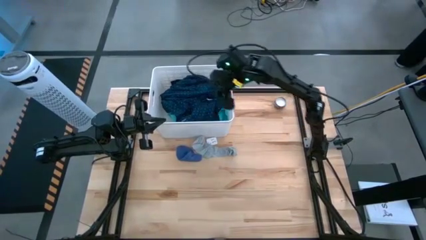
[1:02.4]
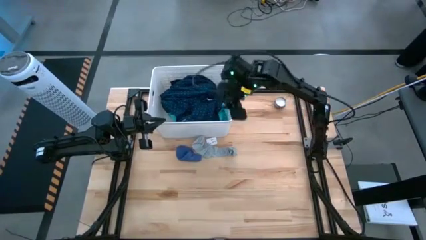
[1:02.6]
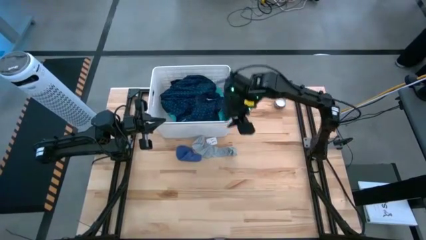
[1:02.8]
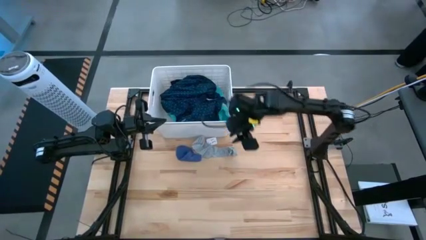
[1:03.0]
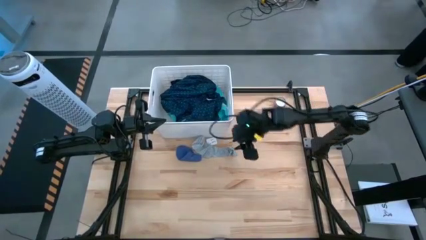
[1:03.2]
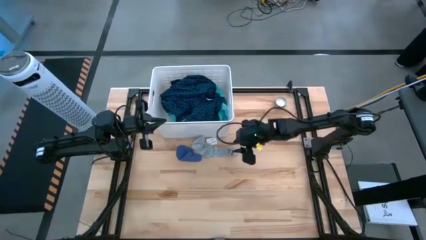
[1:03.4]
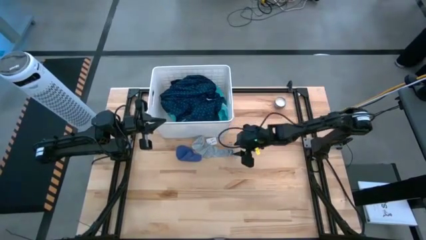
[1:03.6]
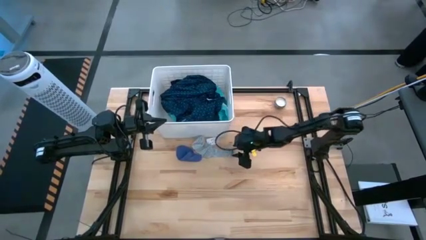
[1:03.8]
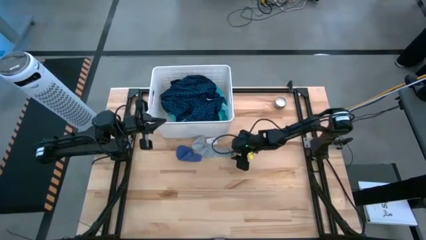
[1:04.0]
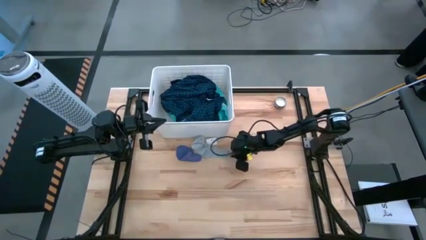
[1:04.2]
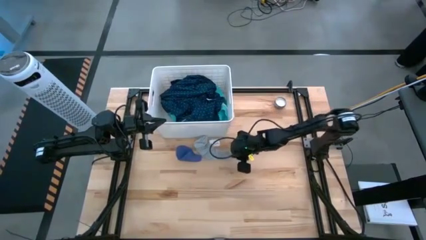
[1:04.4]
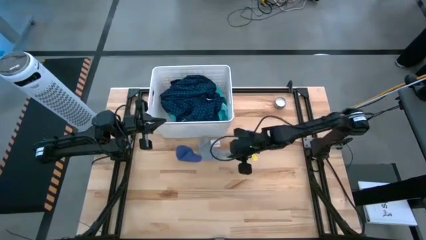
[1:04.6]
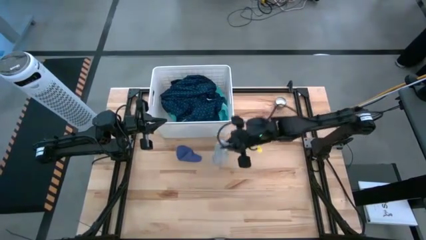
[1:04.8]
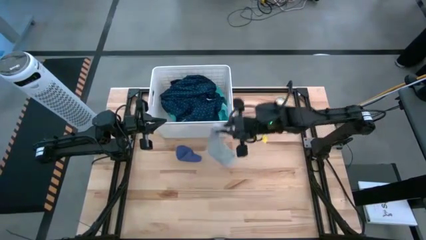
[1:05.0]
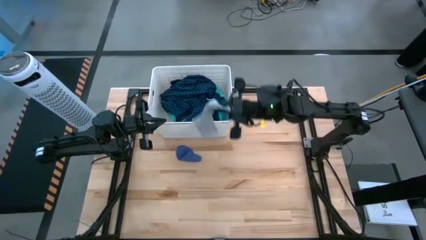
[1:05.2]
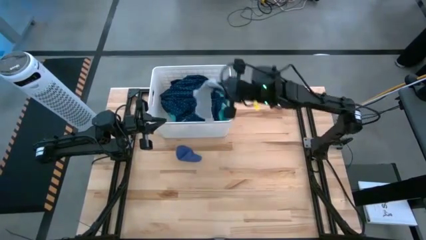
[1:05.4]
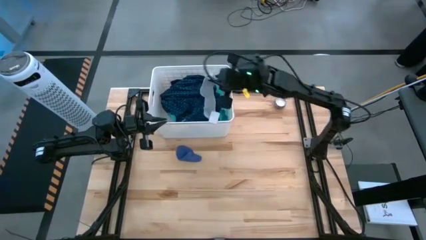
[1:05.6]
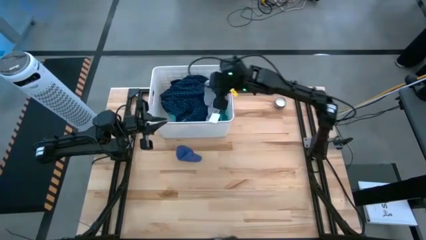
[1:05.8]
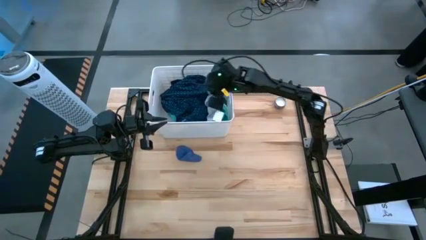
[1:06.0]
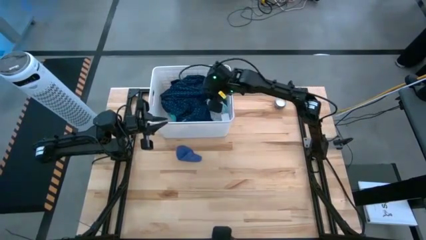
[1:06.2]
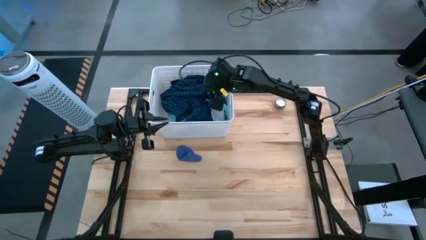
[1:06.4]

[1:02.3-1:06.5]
Task: Sort clothes
Put the gray sock into the white laundry bin

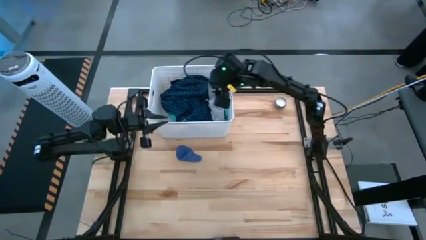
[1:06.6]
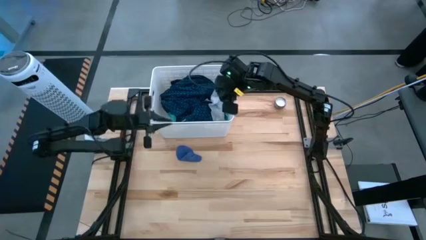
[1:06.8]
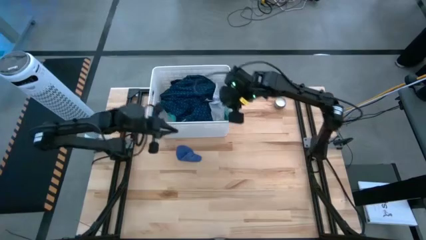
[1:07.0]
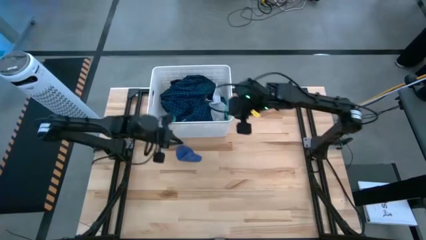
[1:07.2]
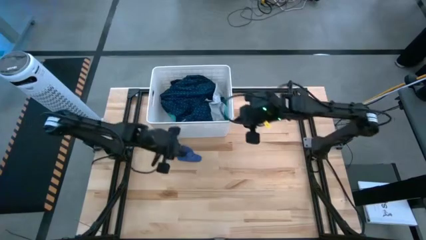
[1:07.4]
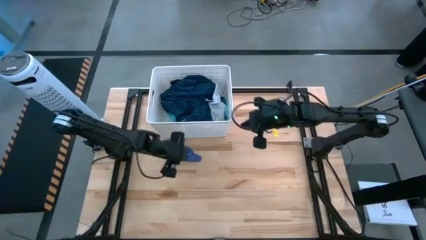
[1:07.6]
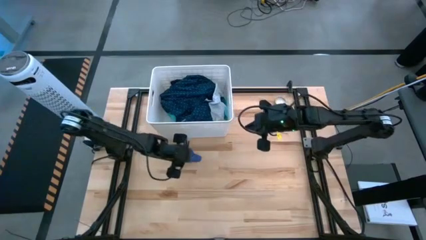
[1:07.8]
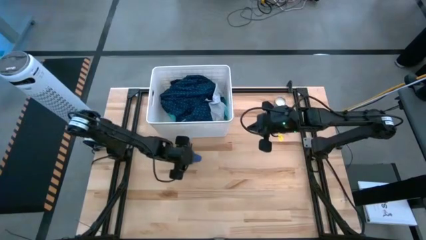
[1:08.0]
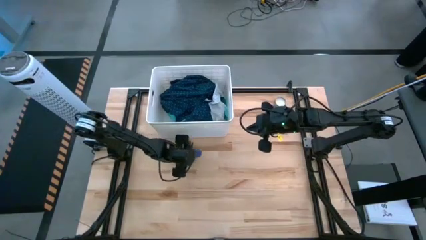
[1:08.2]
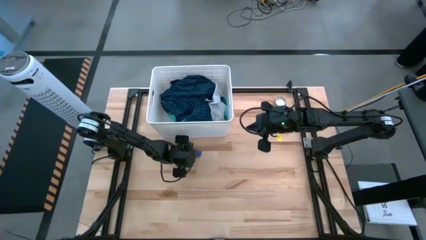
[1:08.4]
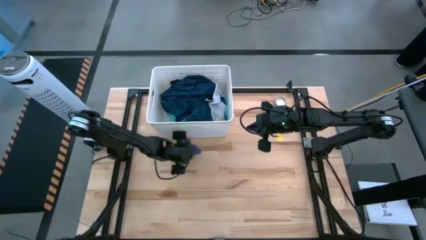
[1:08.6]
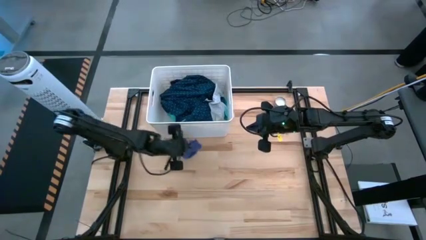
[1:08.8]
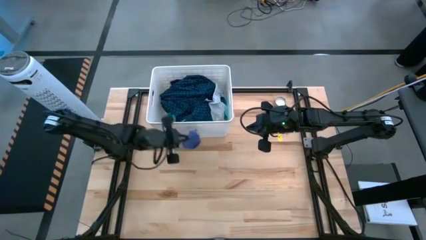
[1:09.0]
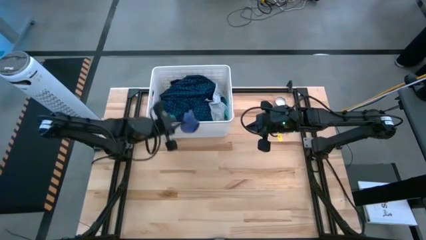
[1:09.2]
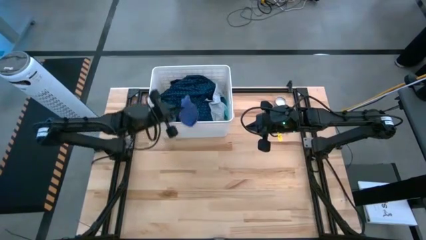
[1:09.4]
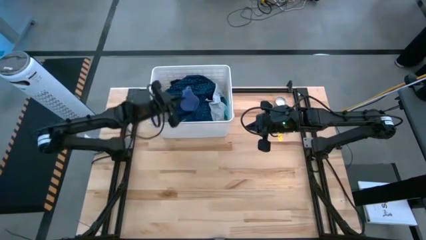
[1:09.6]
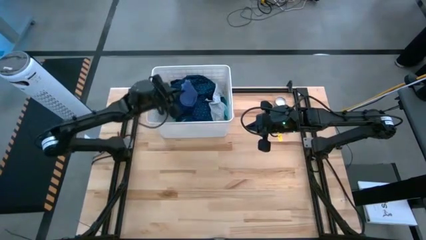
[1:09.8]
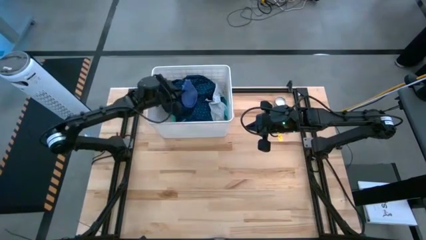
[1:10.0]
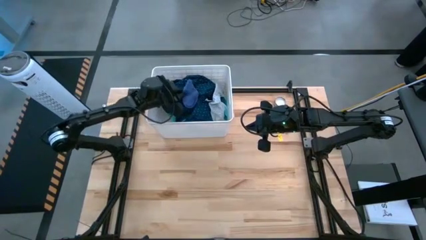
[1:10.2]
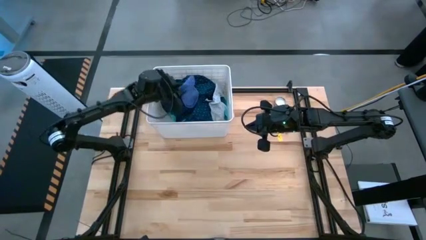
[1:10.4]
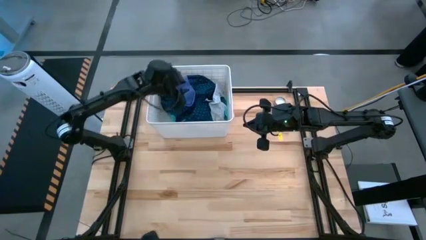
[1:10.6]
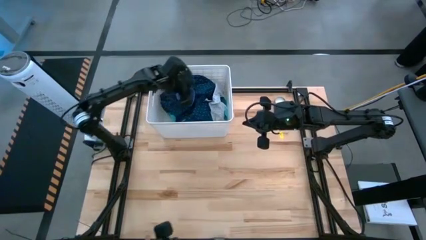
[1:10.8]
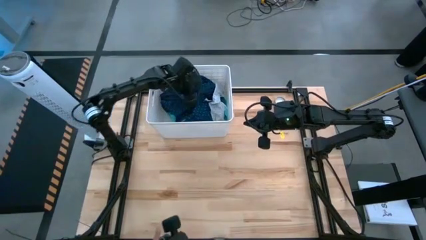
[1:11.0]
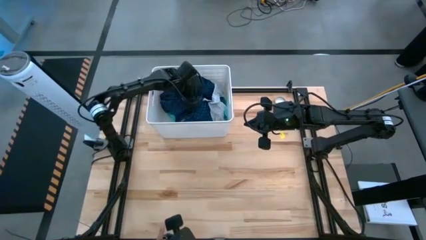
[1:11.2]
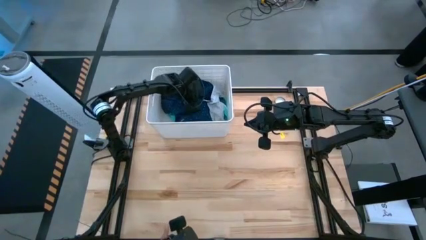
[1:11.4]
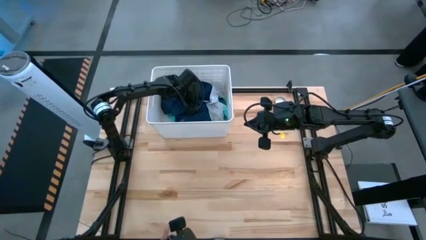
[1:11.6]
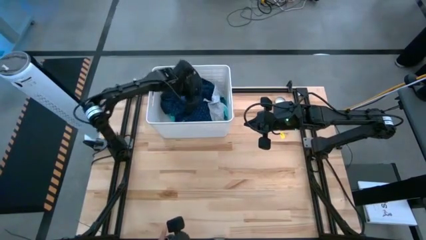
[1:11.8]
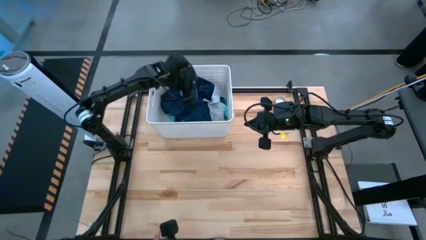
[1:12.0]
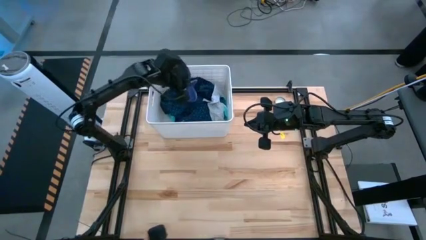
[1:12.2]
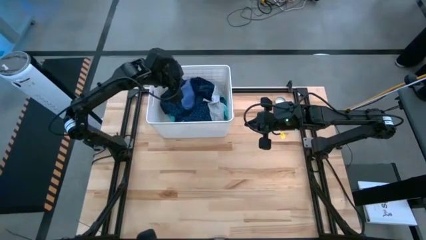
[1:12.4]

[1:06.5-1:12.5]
Put the blue sock into the white laundry bin

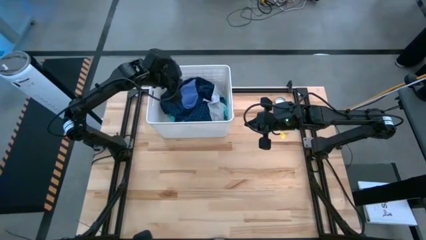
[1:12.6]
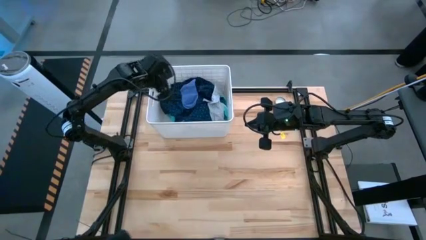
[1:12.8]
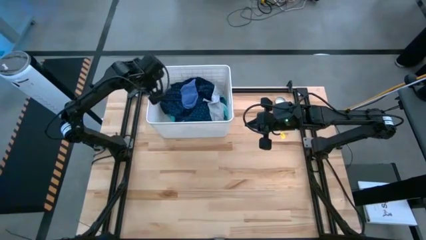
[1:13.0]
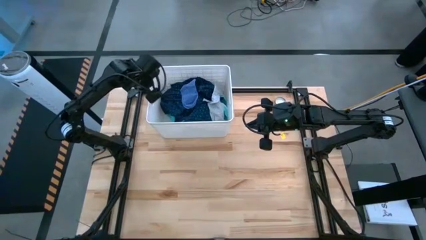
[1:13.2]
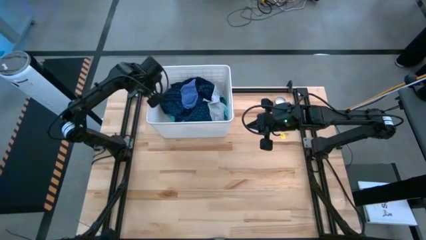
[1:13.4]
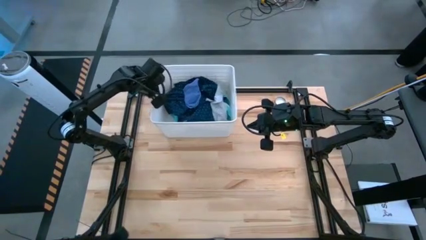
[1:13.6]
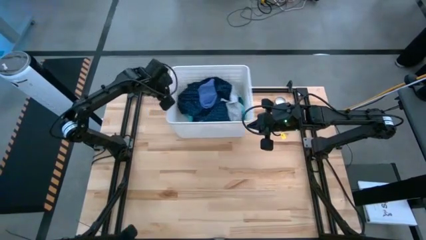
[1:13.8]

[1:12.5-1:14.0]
Adjust the white laundry bin

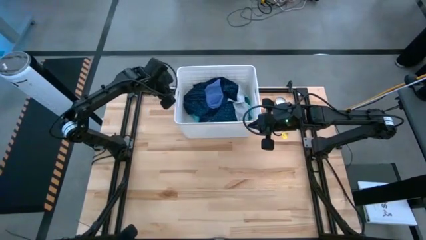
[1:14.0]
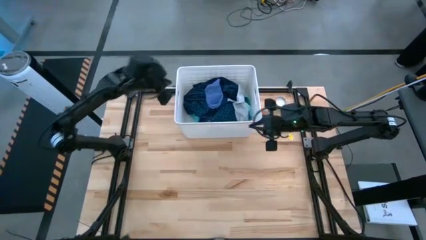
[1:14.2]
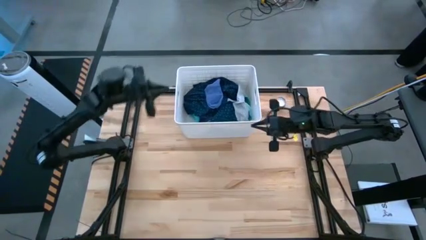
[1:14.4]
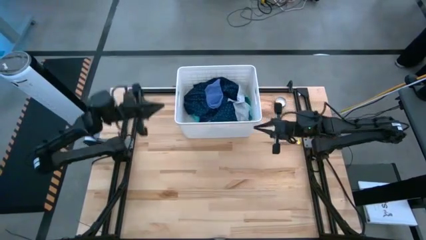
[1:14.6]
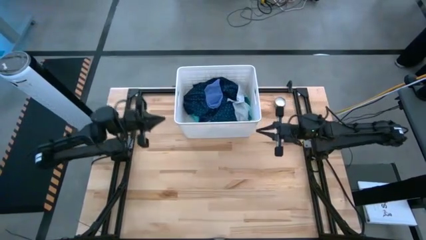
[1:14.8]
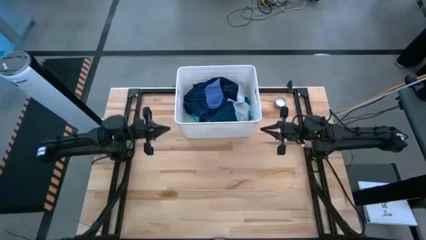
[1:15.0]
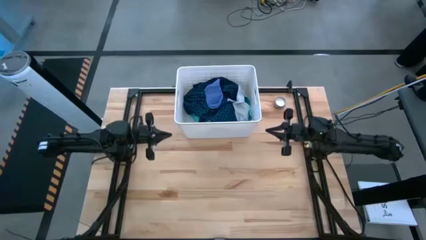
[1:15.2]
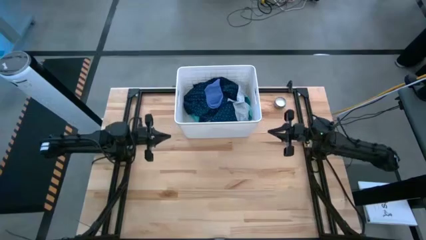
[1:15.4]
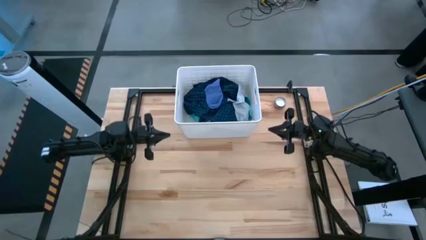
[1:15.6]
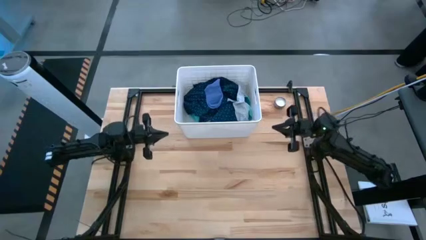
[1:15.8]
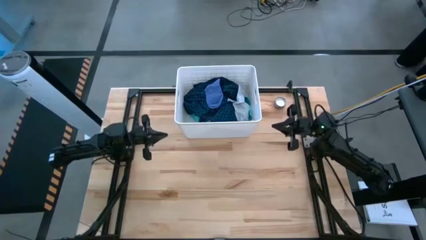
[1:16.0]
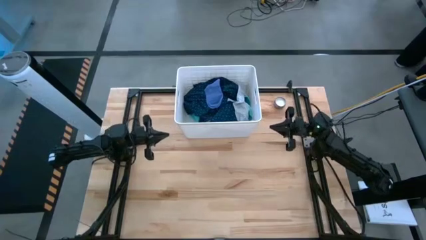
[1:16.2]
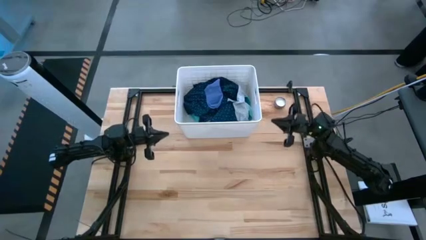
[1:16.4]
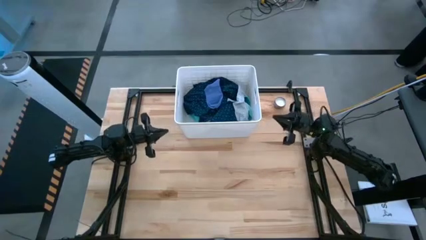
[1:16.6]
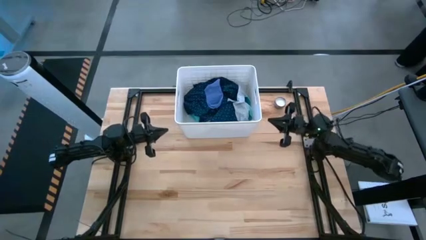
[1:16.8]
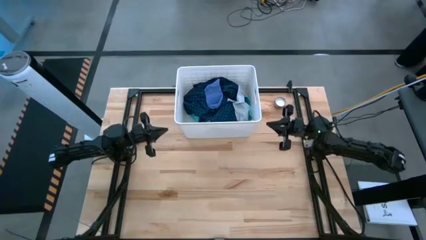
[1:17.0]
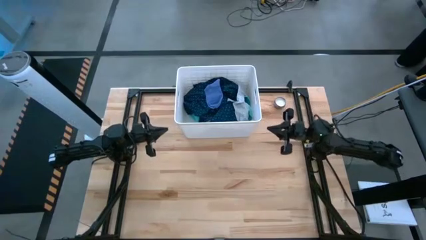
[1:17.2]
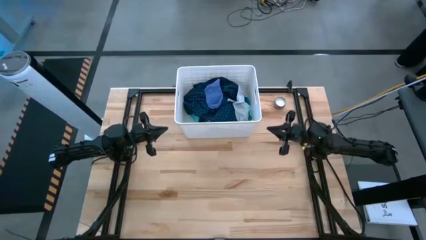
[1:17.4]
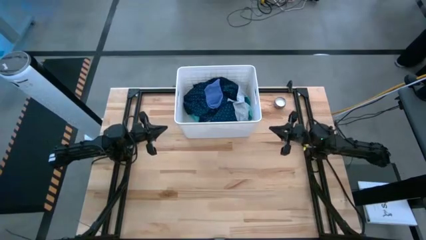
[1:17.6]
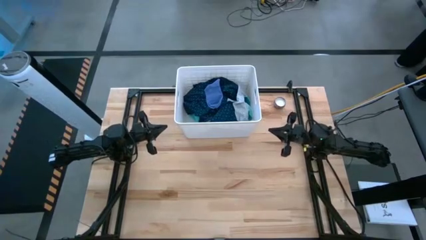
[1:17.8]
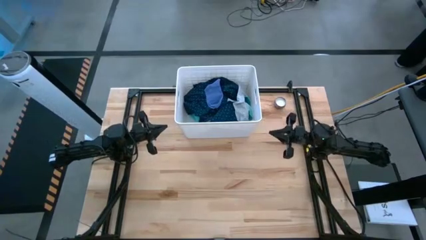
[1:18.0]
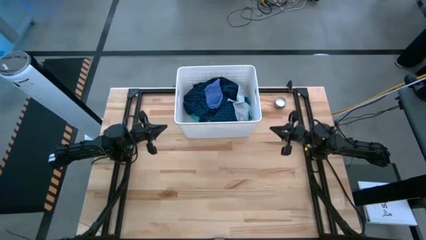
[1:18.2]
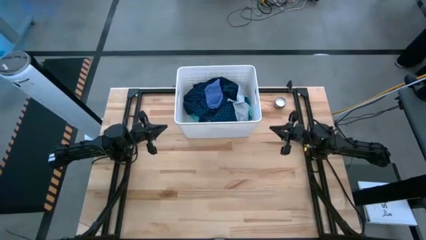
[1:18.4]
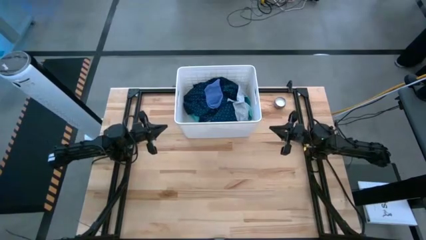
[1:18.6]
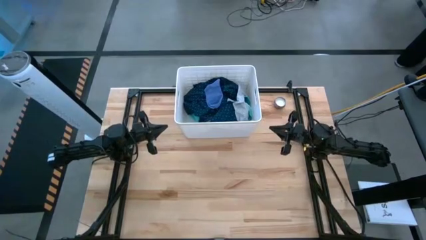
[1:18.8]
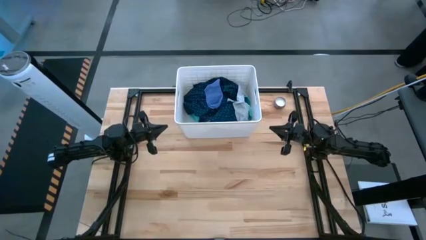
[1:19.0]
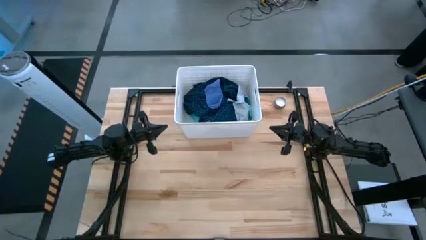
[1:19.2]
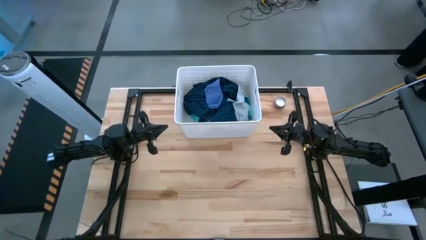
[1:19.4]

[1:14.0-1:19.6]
Return to Home Position
